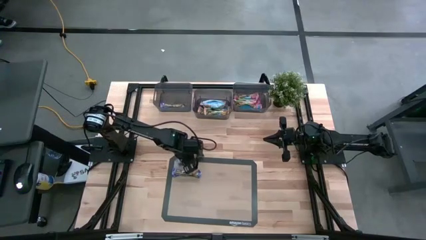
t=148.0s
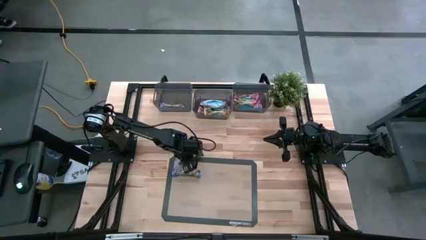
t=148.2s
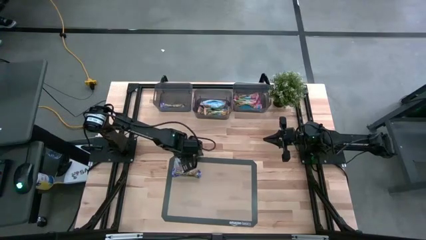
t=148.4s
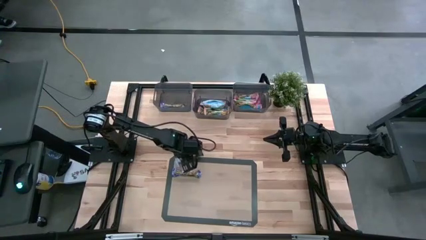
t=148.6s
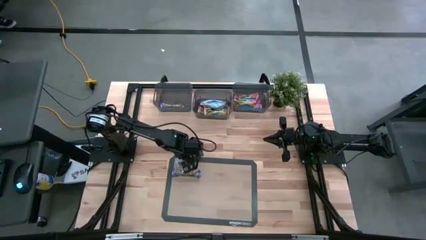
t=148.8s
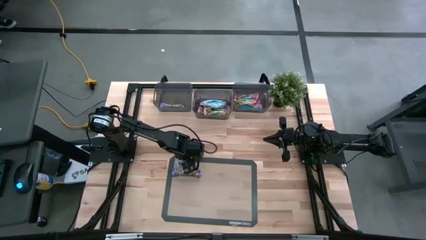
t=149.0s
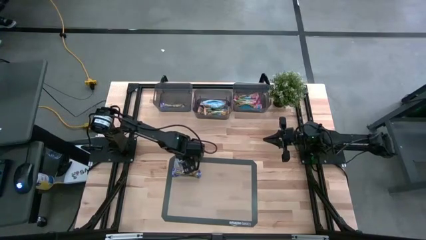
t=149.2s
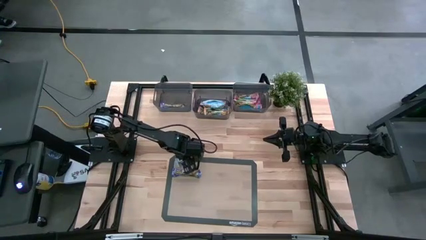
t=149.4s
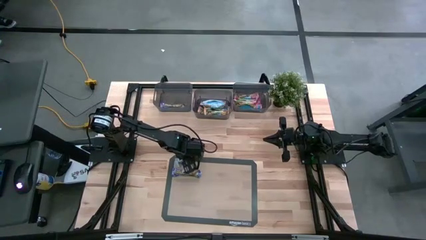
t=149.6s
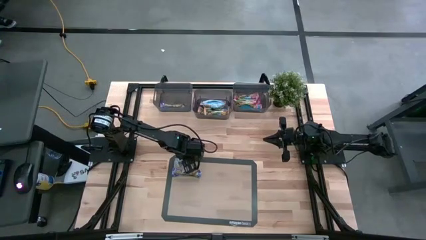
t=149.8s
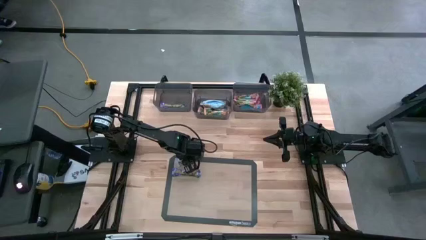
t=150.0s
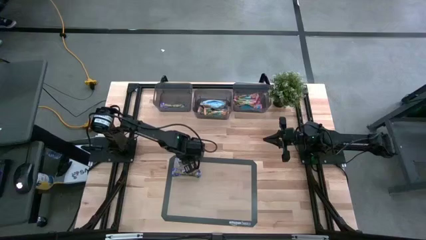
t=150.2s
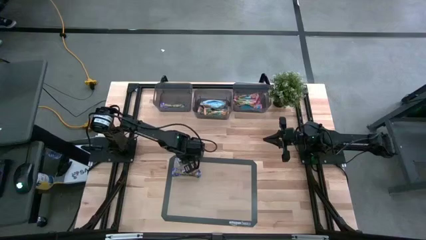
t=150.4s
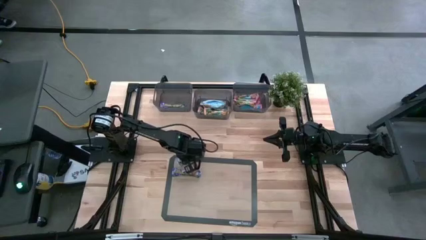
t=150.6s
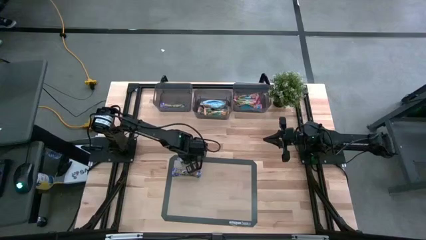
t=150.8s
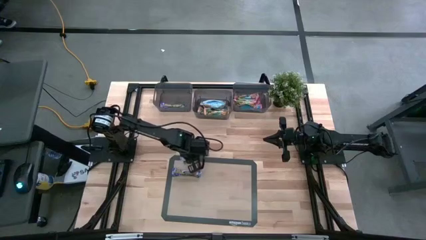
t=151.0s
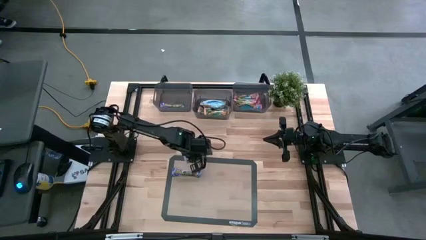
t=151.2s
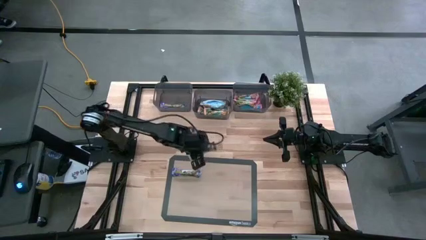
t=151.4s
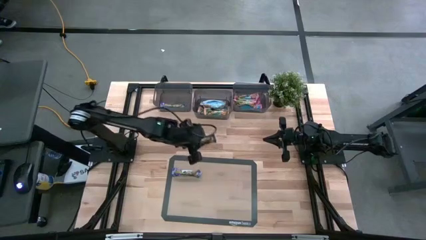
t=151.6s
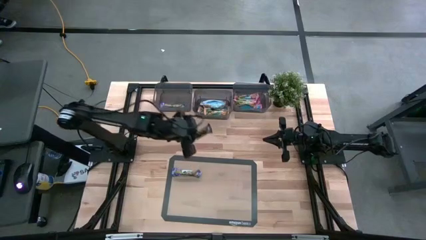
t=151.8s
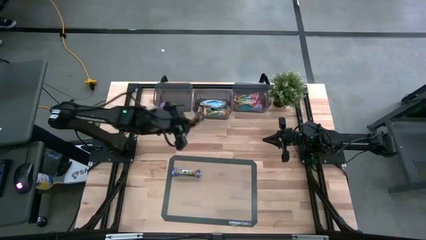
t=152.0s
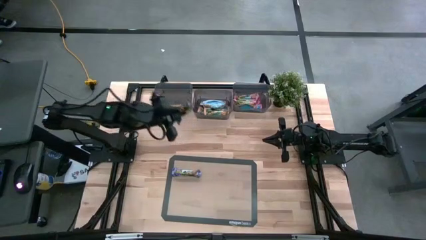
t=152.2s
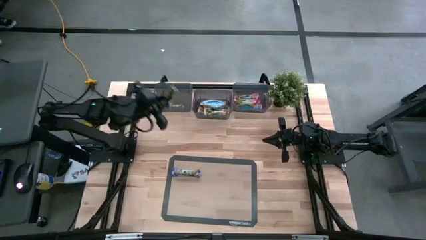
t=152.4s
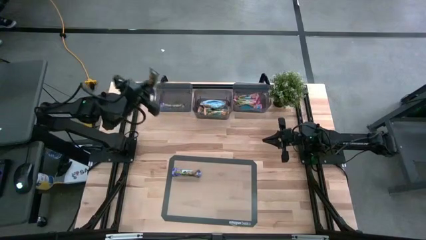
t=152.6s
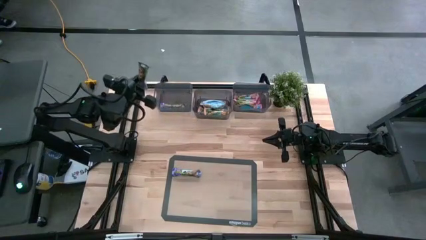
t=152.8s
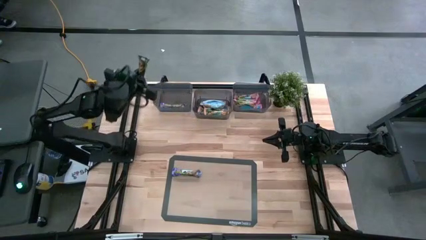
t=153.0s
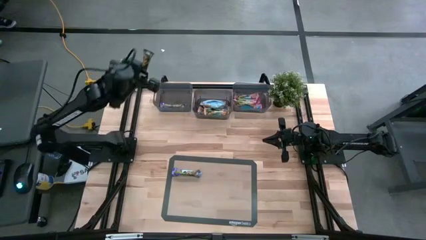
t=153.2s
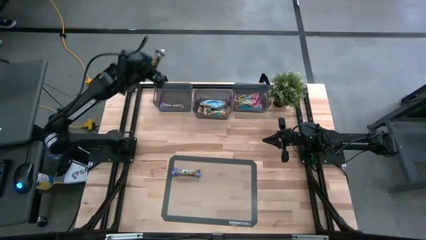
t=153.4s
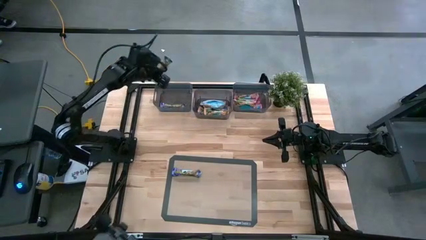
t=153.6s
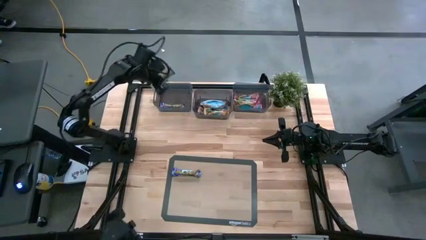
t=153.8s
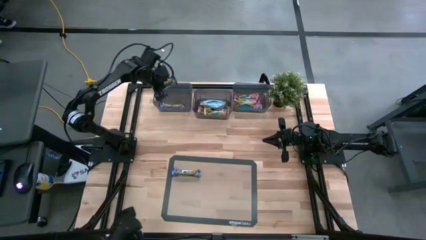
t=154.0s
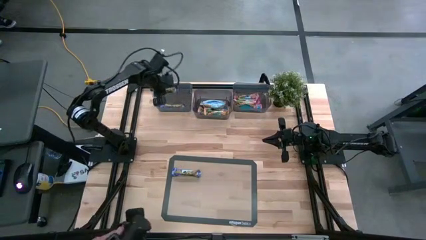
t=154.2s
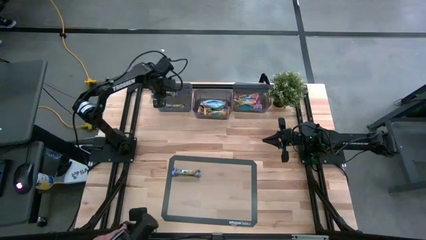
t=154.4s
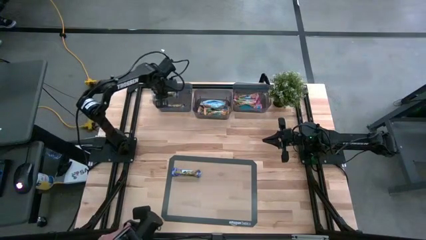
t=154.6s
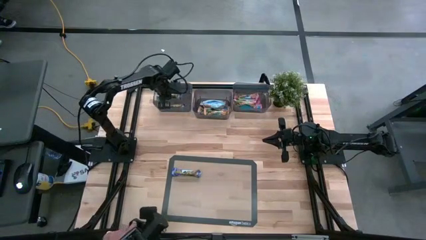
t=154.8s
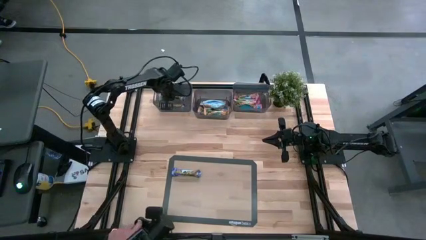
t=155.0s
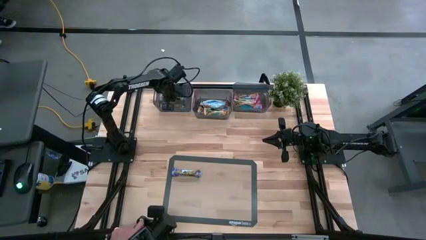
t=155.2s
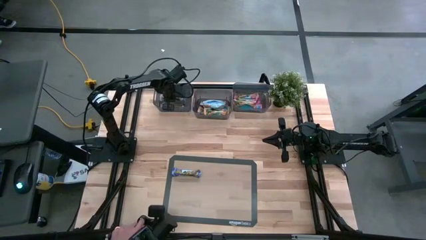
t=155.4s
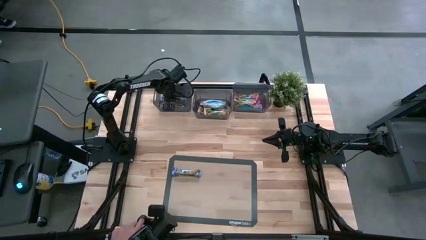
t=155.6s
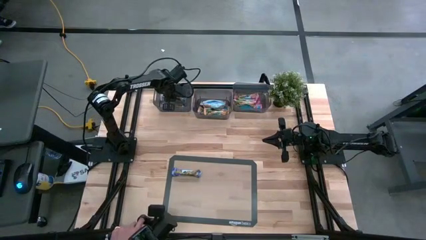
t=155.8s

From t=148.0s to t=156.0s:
Task: Pick and place Granola Bars by type
Put the top blue granola bar into the left black bin

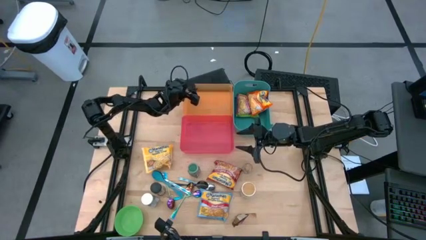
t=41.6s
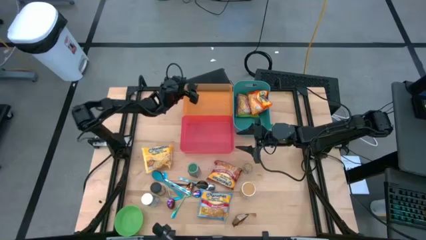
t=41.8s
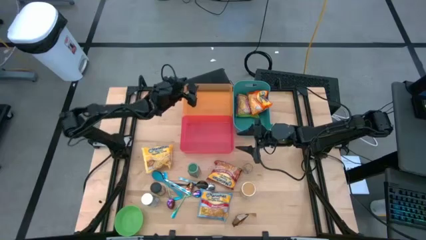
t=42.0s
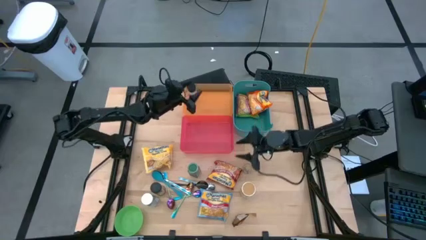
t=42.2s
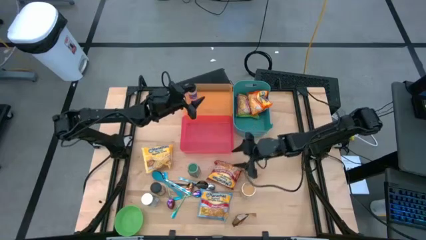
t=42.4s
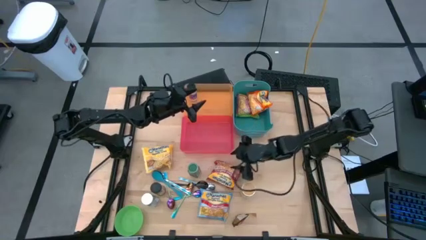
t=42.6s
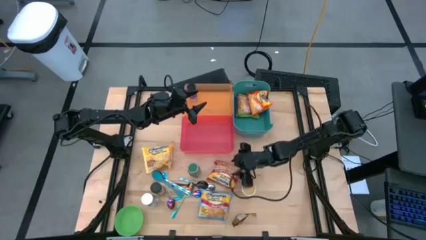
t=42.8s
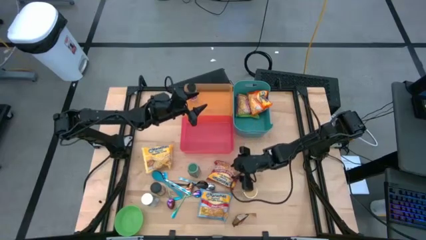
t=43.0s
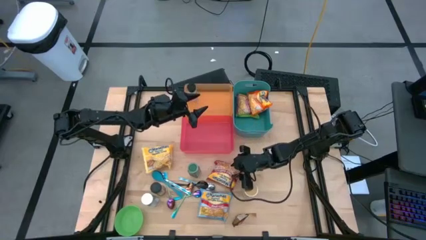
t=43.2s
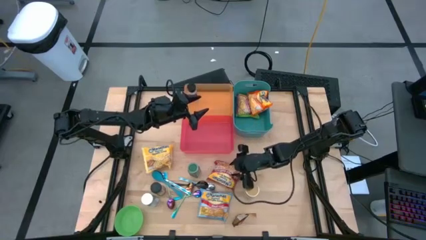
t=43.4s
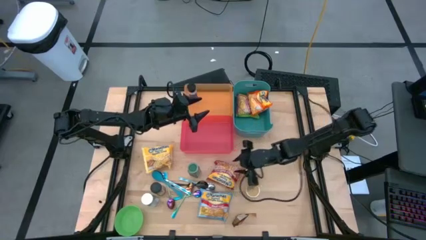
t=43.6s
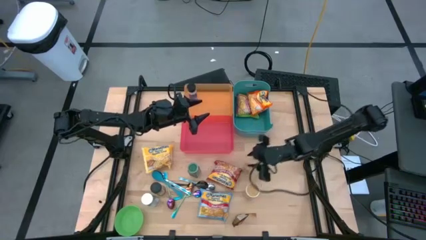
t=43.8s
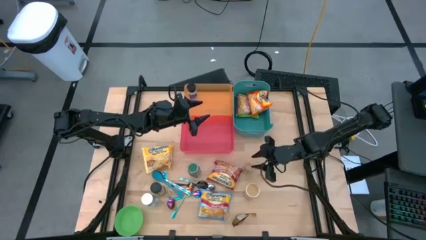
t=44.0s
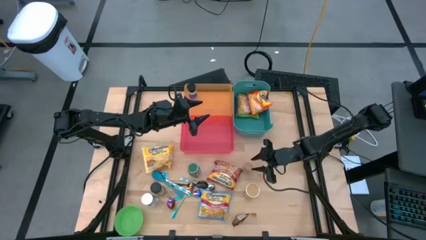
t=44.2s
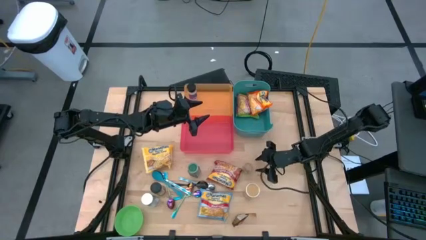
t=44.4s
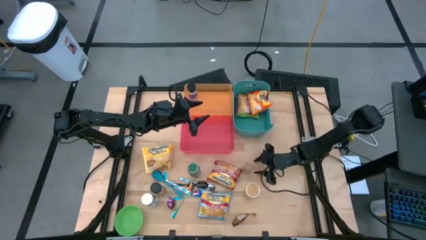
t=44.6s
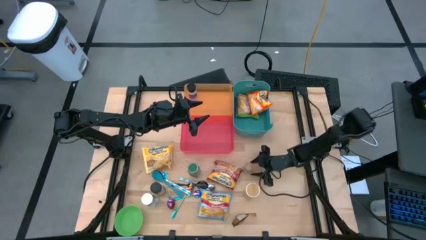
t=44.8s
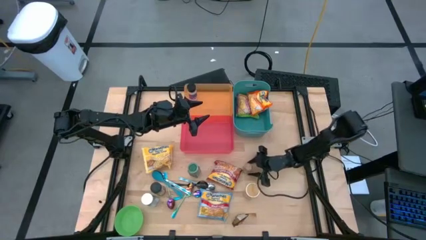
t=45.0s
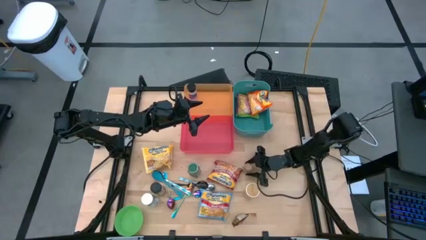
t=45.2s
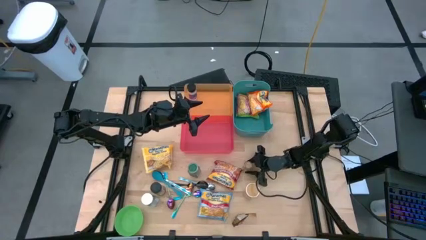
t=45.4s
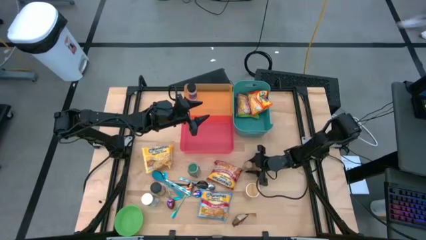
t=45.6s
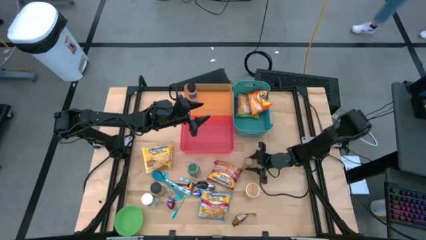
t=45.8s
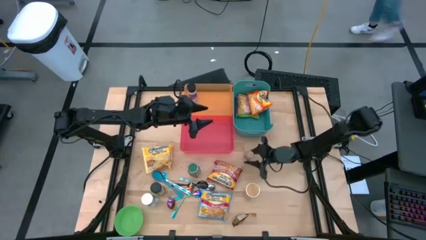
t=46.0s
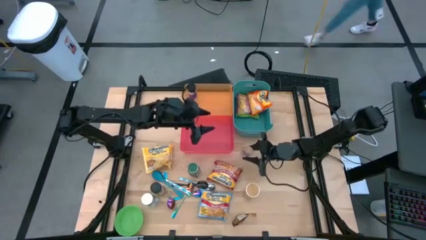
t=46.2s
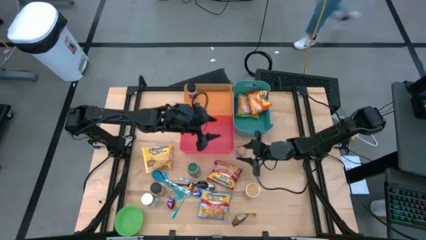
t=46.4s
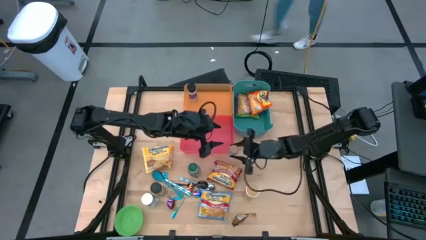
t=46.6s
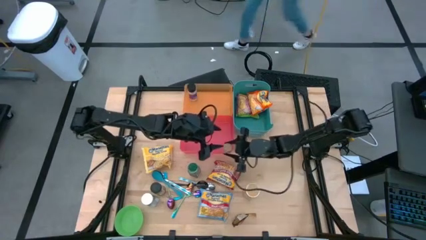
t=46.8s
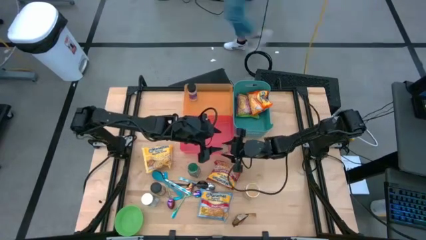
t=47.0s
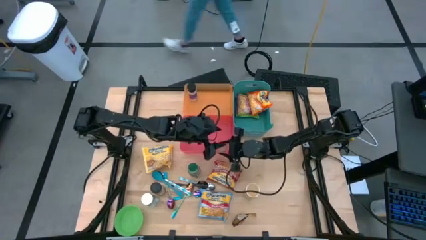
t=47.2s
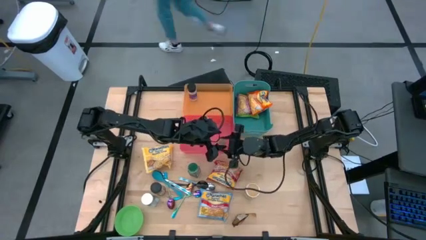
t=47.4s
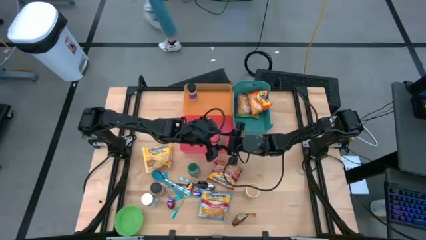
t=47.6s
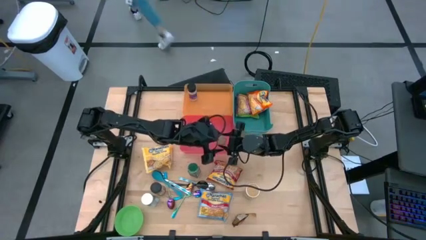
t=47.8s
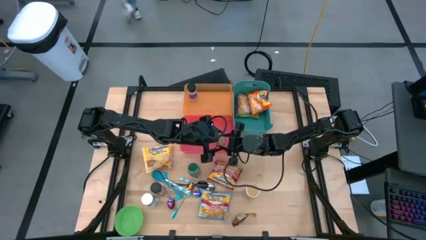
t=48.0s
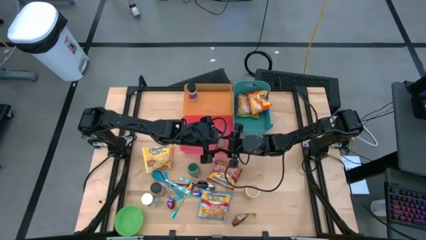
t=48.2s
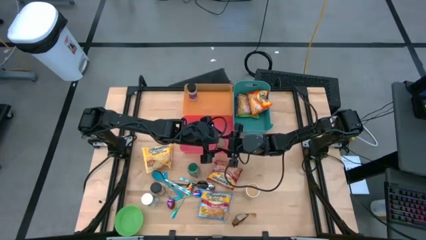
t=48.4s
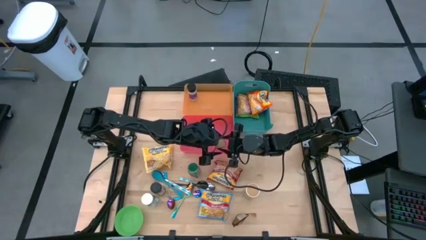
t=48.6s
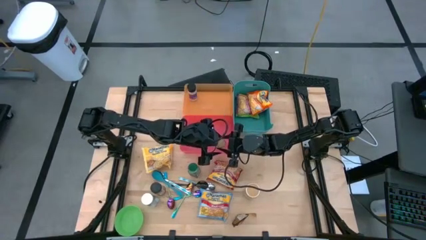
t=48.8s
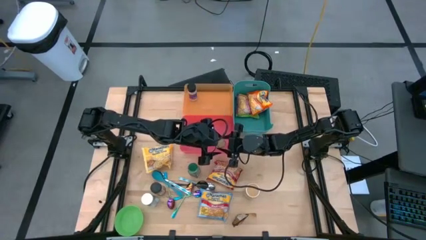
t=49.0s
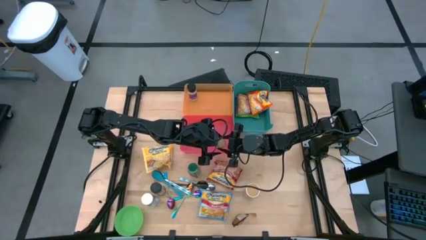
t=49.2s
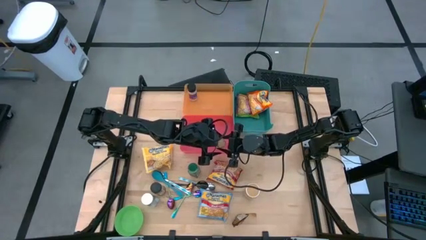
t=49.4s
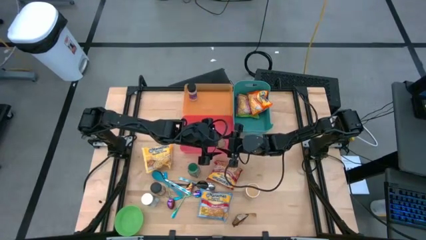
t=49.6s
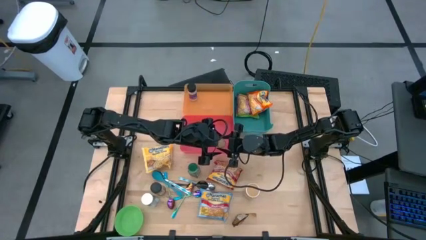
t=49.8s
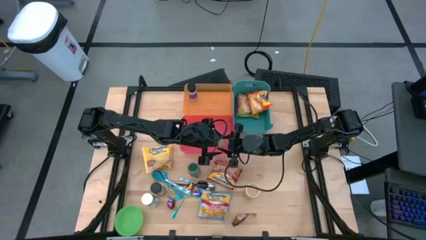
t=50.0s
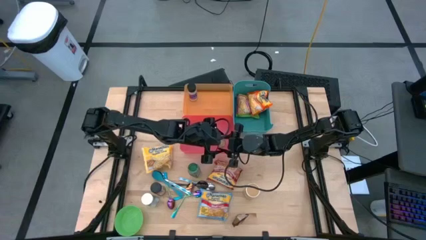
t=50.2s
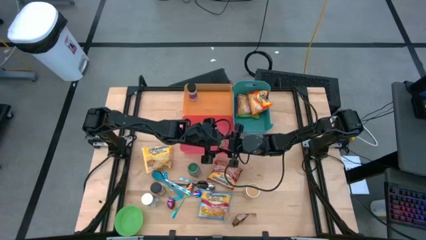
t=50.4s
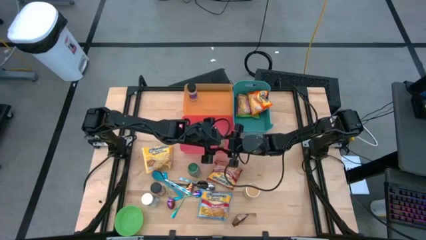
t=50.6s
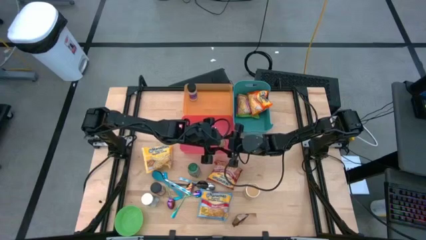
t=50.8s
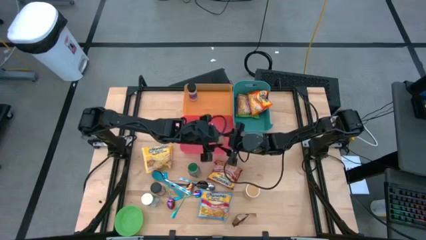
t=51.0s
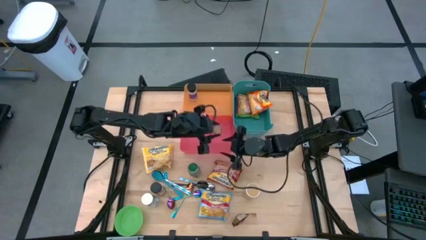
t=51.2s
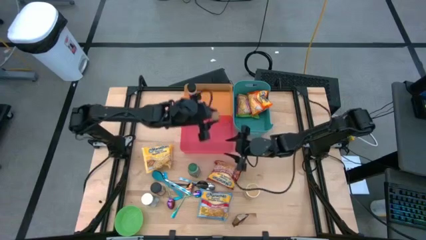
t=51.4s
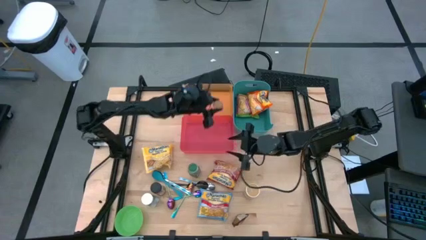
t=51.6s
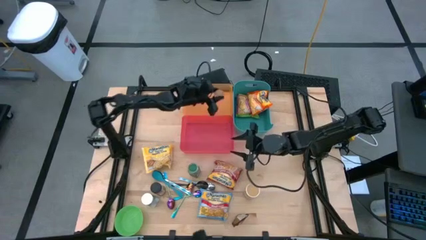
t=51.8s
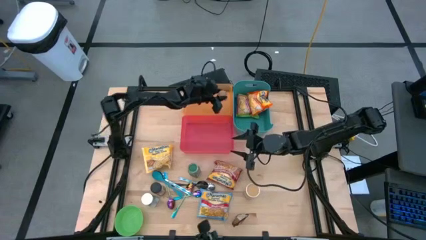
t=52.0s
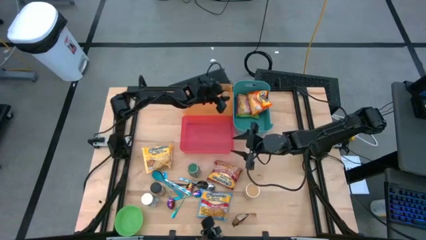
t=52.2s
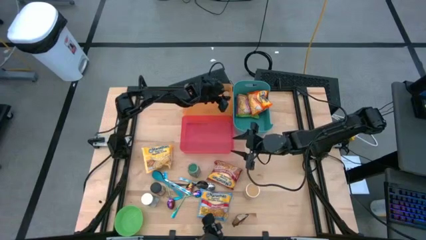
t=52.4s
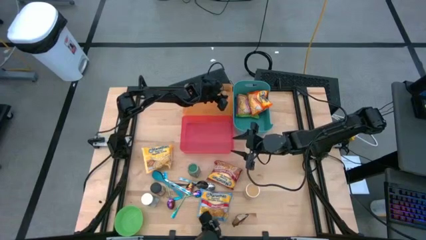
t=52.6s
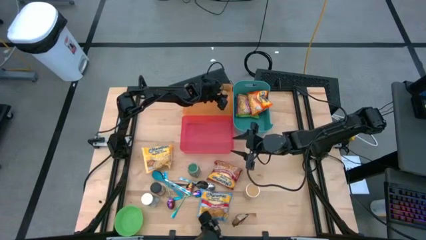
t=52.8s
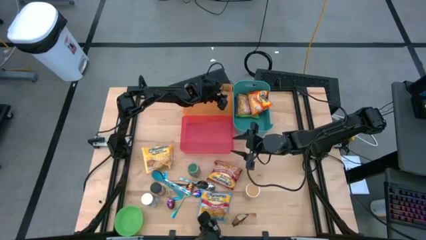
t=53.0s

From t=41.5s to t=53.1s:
Task: Pick & Place Food Item
Put the brown spice bottle into the orange bin
